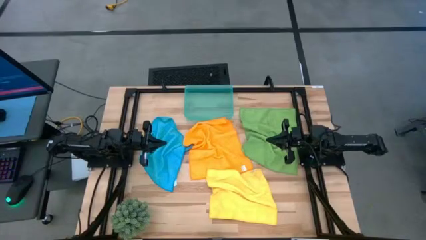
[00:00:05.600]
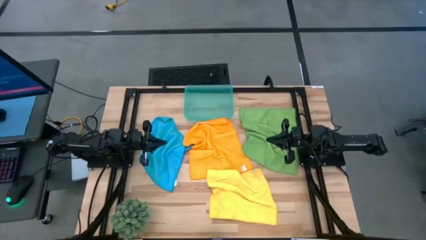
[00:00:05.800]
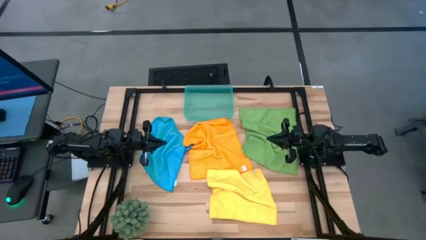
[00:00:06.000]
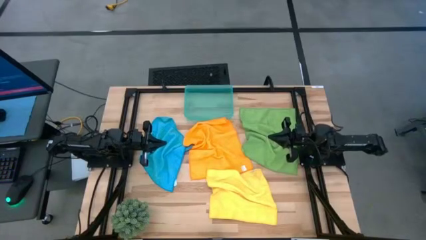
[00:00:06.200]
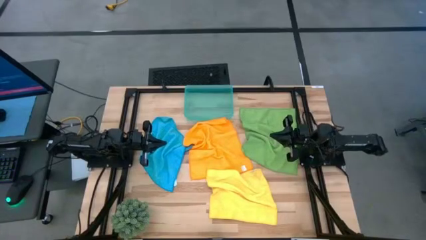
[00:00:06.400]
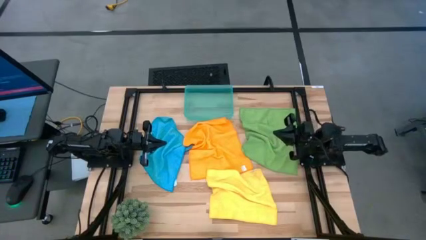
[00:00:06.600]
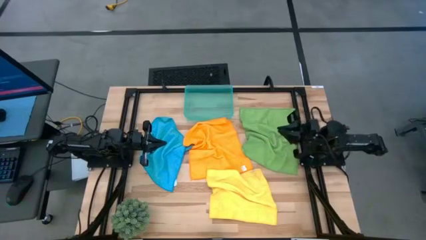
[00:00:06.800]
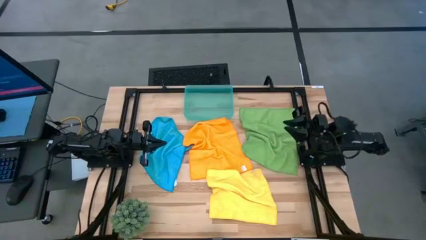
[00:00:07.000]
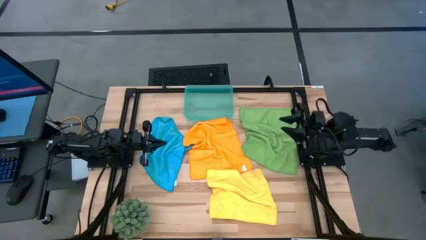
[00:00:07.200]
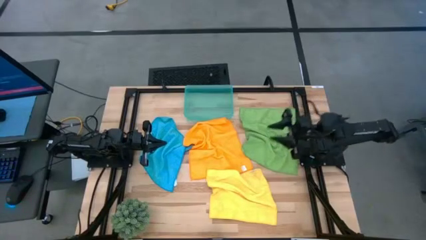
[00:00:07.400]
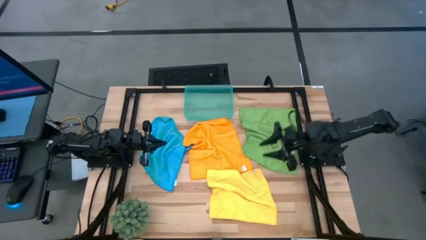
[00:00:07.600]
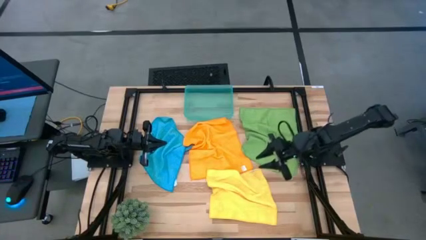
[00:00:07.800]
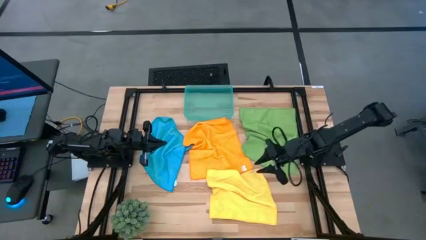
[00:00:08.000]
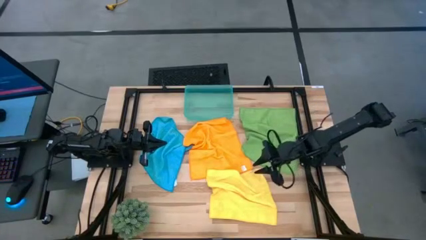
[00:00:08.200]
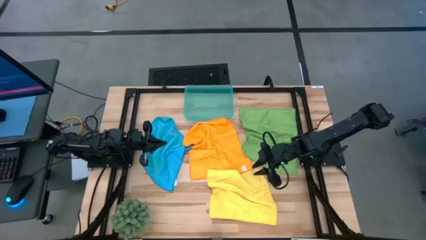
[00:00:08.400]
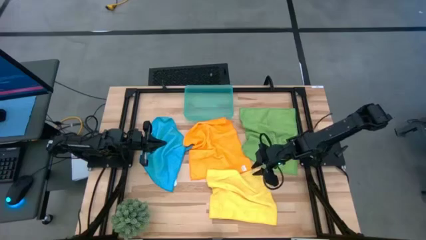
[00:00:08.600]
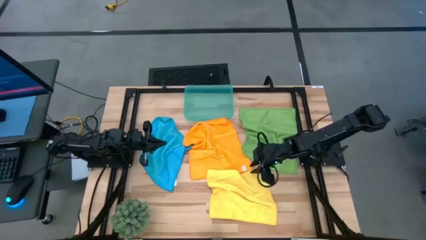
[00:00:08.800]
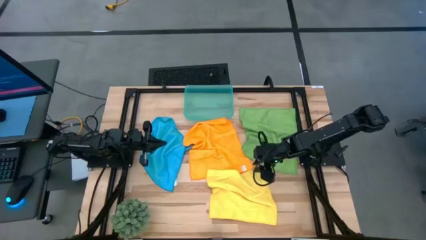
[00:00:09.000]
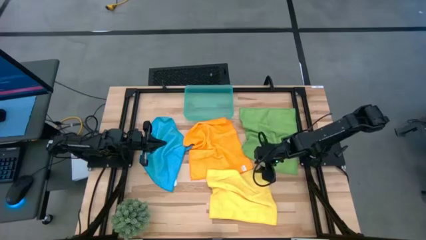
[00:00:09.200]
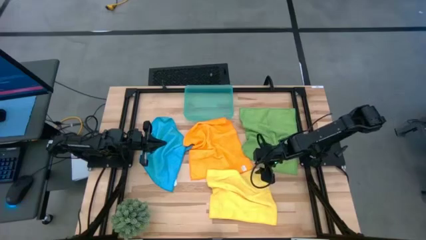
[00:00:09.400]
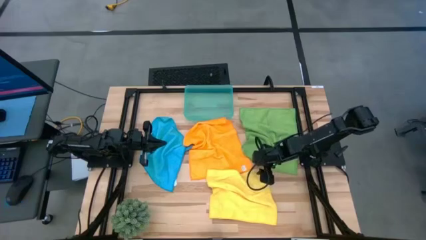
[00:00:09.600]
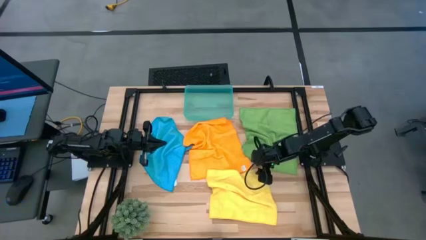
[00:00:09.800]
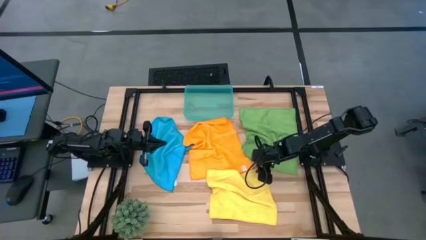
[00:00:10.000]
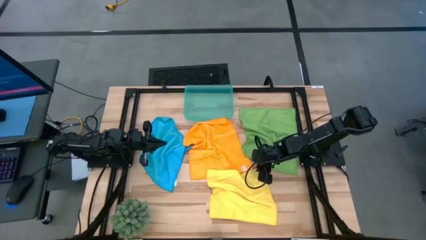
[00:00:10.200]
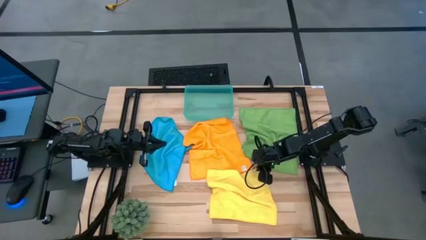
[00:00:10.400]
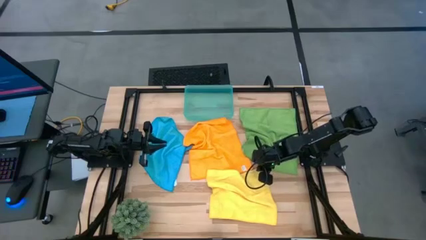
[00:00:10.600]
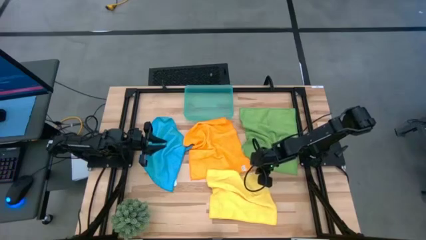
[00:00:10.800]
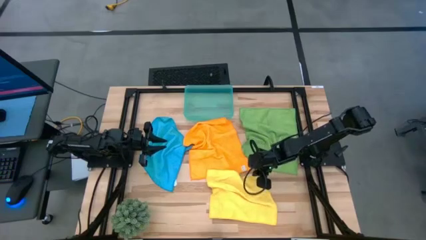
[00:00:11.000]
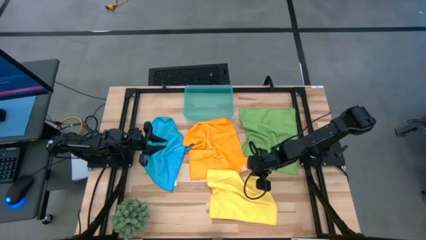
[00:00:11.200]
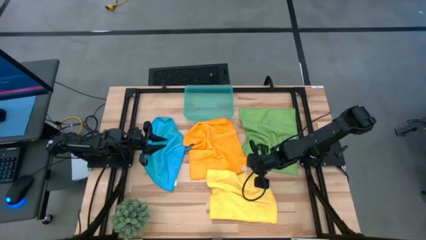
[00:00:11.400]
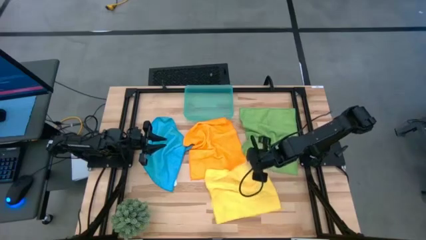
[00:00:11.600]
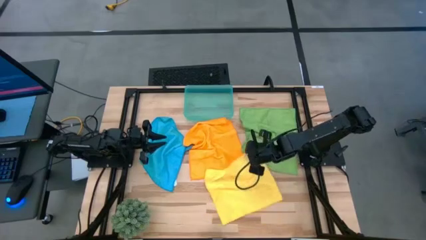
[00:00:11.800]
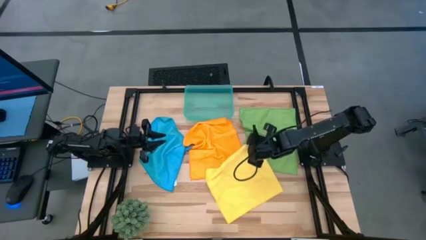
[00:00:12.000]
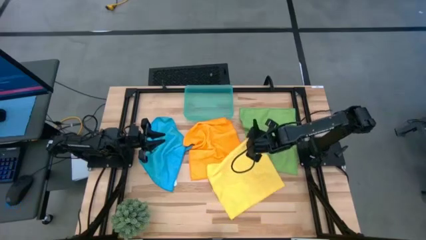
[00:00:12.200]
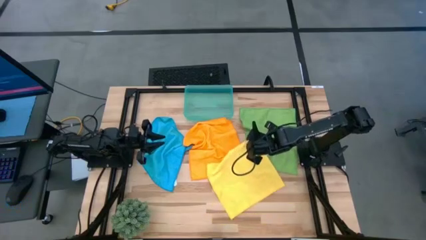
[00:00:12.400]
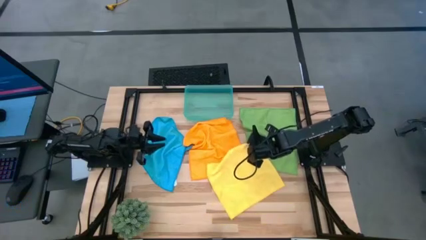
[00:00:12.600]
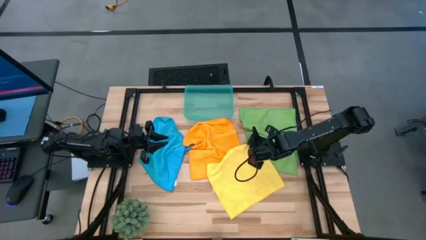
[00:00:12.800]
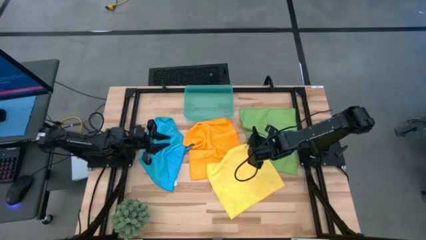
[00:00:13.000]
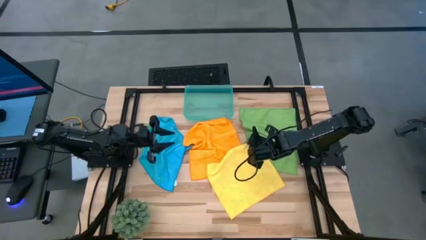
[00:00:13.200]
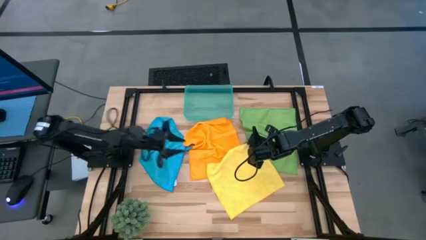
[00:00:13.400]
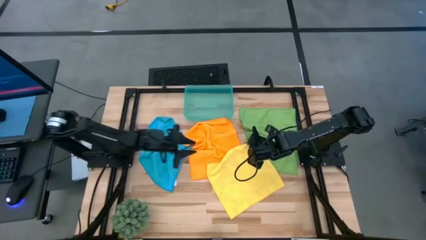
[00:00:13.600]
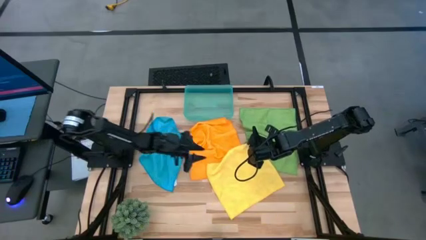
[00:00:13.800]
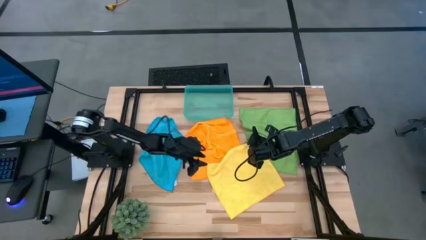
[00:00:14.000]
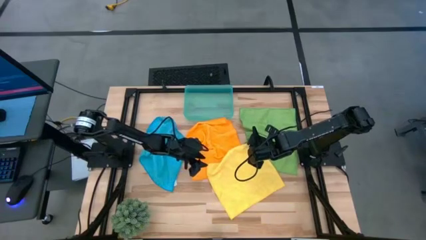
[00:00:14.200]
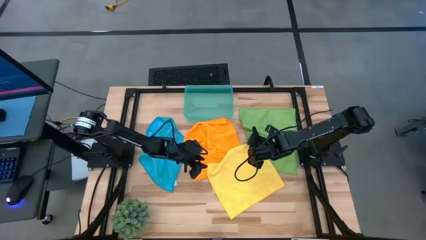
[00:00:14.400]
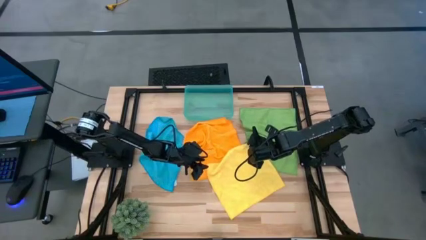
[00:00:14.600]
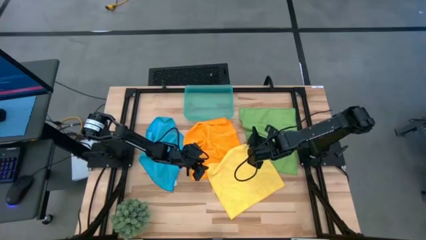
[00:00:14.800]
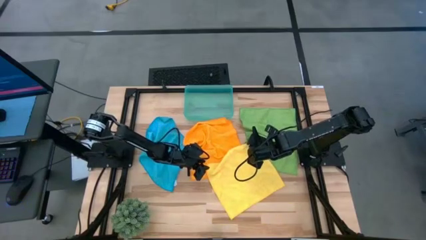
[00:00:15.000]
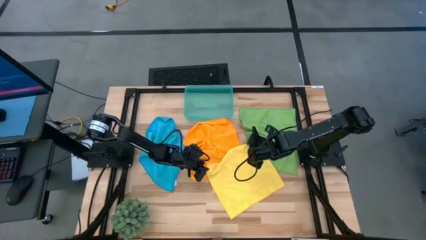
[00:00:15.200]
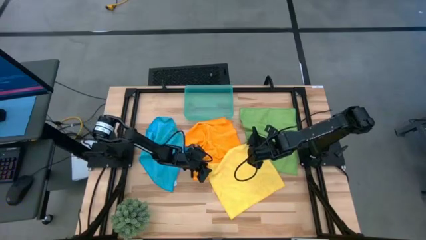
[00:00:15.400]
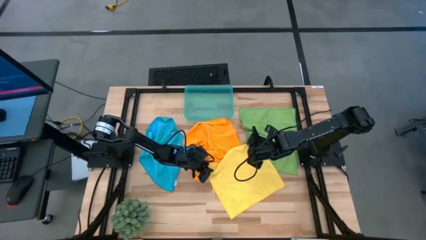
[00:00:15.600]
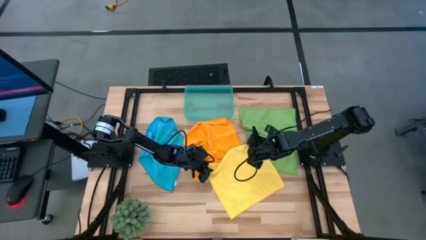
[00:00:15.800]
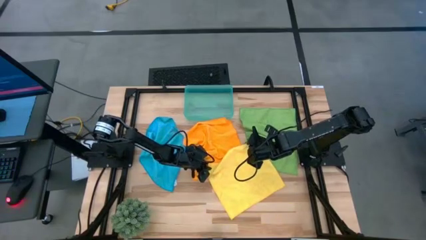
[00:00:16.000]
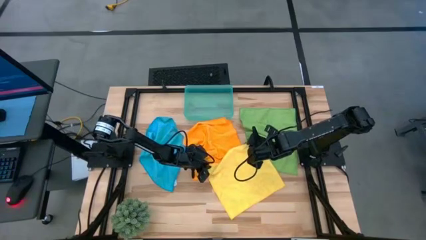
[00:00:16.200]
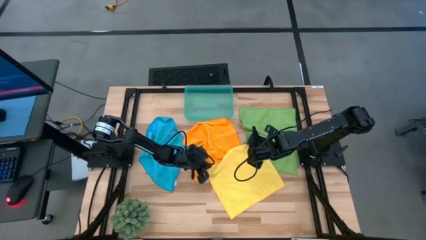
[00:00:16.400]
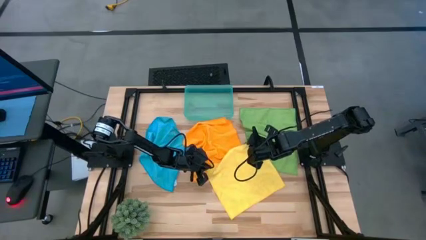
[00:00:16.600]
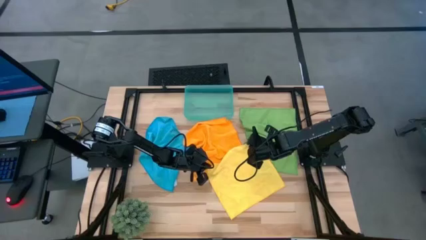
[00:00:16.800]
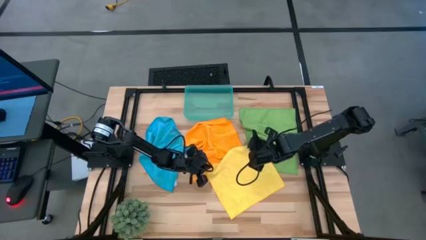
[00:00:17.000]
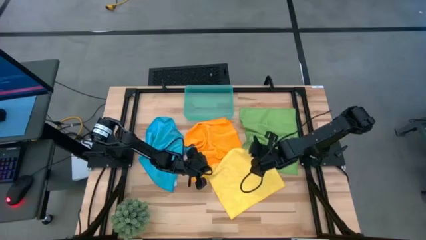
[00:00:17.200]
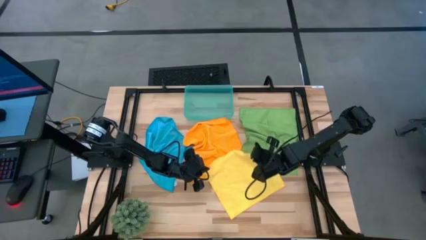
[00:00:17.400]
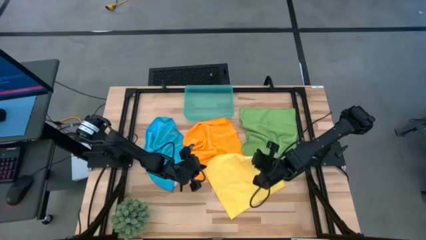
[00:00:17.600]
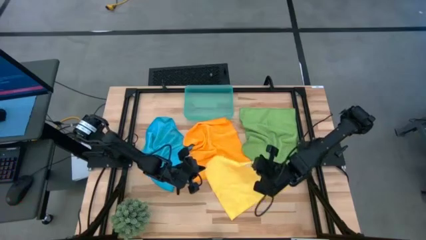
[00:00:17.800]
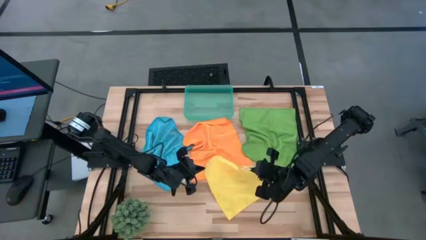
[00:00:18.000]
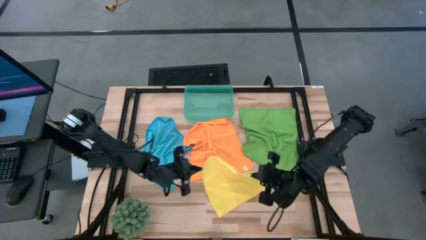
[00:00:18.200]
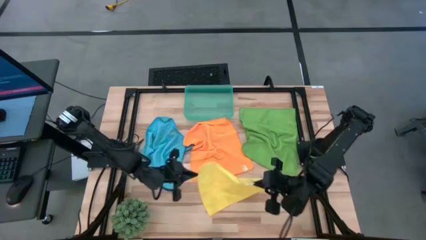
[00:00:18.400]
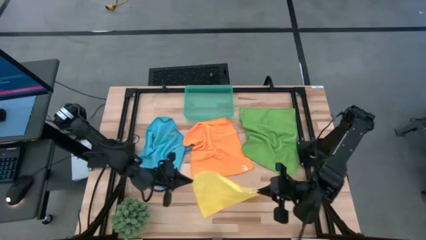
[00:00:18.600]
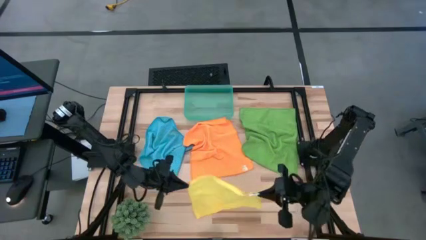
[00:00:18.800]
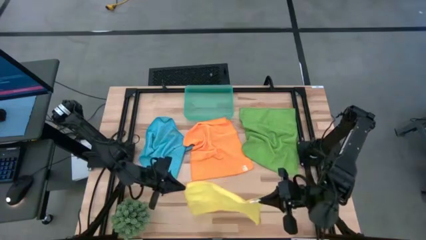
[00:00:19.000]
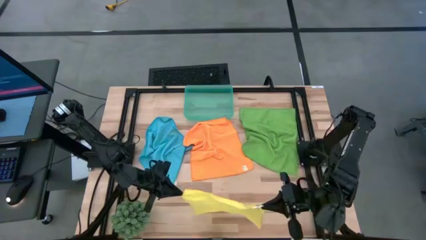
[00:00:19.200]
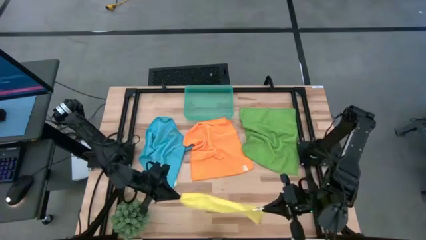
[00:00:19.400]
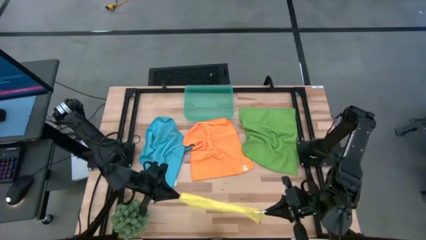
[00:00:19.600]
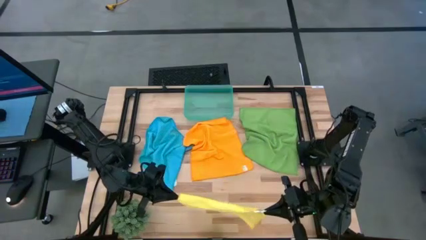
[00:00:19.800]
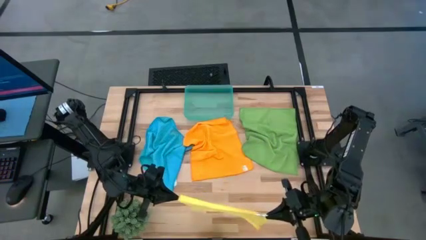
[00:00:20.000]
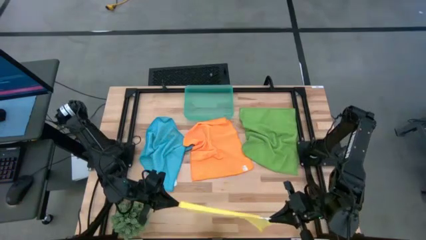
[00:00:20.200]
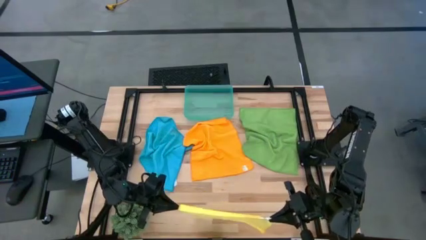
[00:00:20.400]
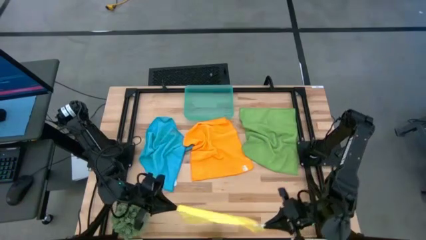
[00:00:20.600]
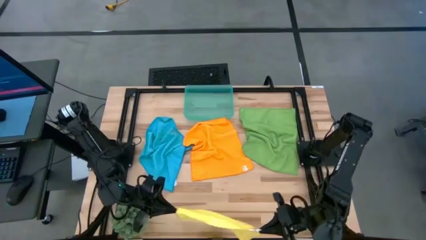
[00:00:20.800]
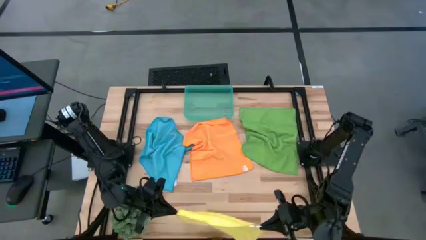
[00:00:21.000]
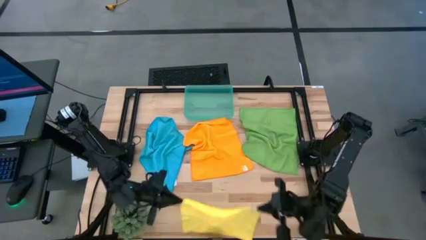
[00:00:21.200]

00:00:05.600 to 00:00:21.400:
Task: Roll microfiber towels into tight, uniform cylinder then place into a basket
Fold the yellow microfiber towel
